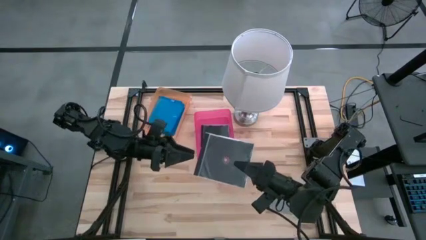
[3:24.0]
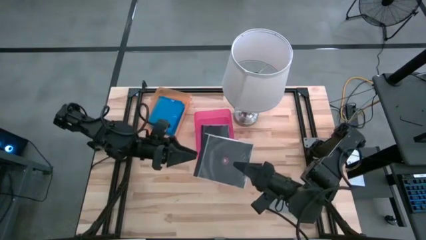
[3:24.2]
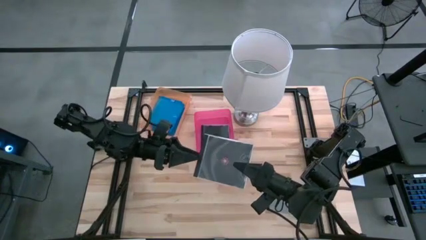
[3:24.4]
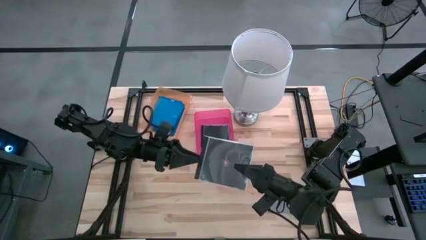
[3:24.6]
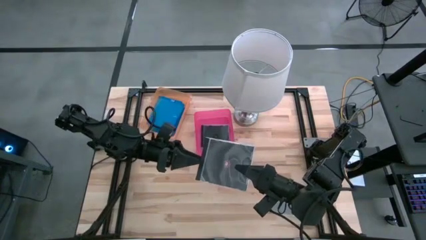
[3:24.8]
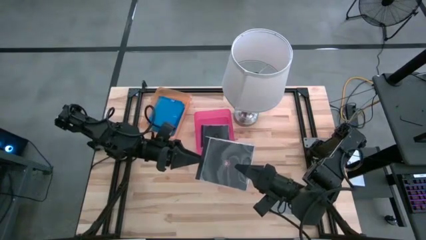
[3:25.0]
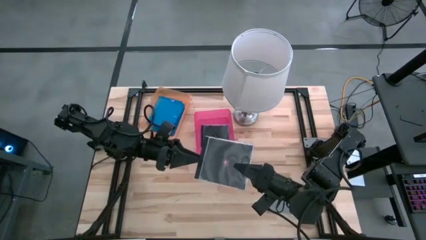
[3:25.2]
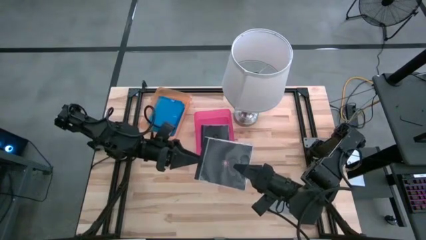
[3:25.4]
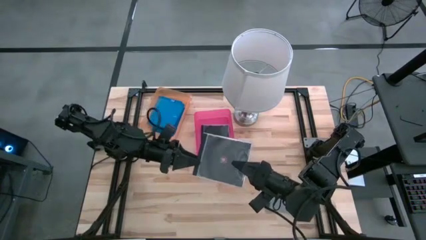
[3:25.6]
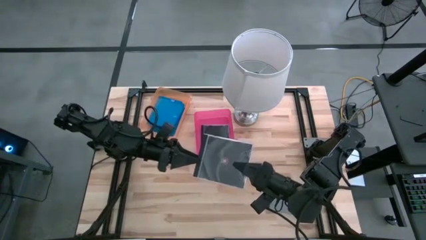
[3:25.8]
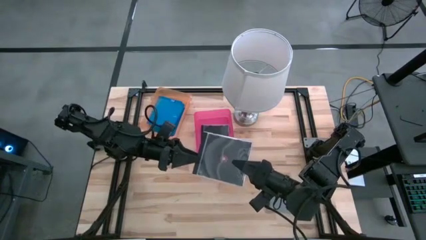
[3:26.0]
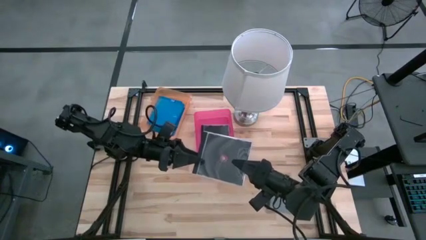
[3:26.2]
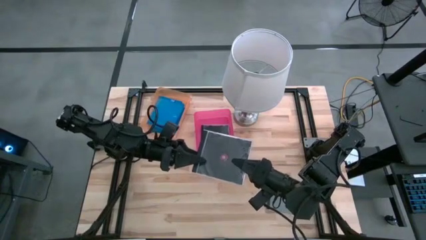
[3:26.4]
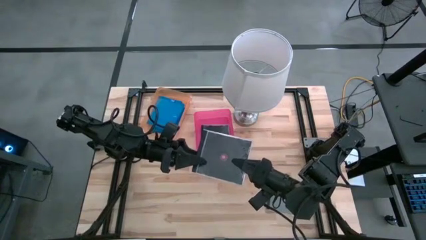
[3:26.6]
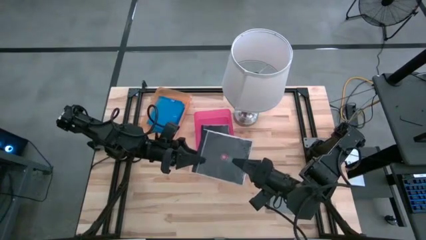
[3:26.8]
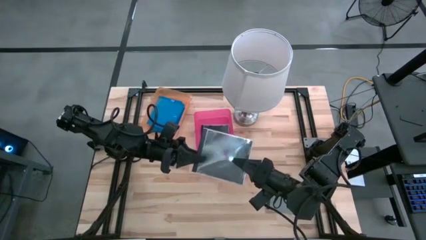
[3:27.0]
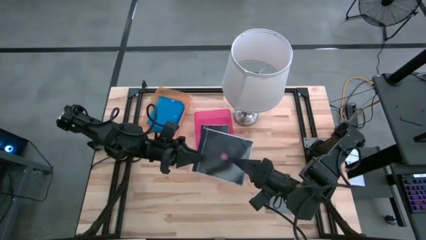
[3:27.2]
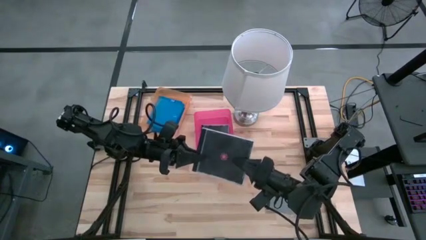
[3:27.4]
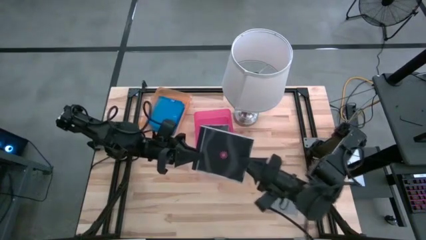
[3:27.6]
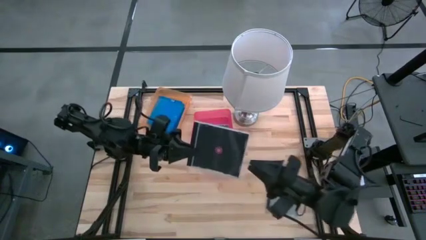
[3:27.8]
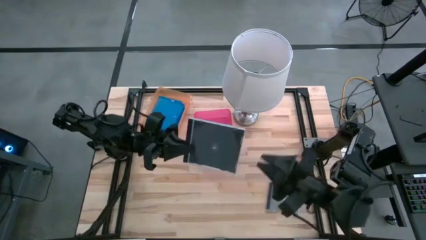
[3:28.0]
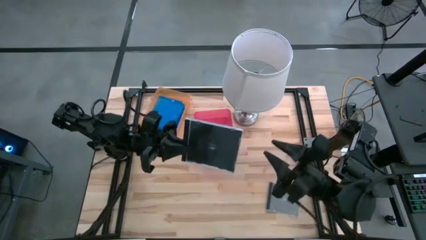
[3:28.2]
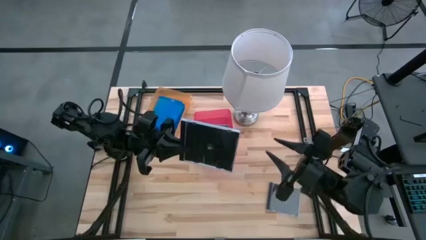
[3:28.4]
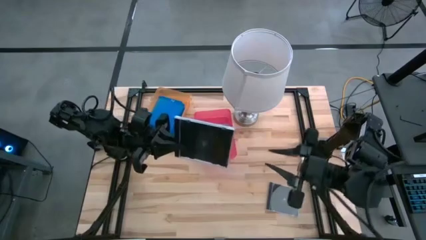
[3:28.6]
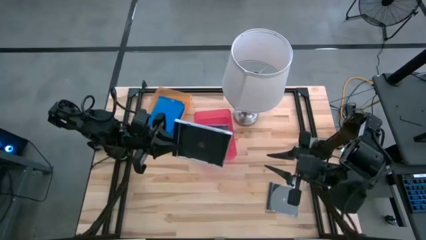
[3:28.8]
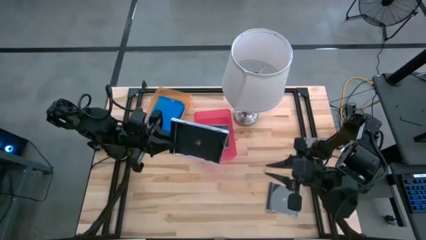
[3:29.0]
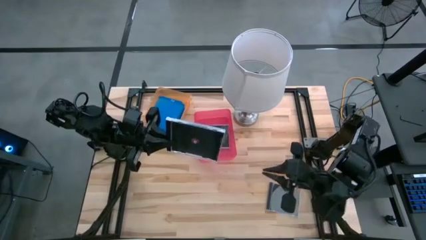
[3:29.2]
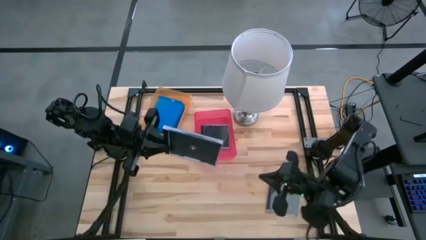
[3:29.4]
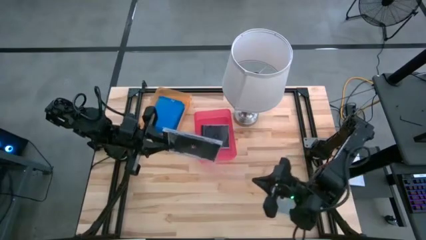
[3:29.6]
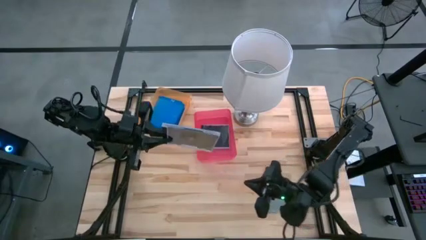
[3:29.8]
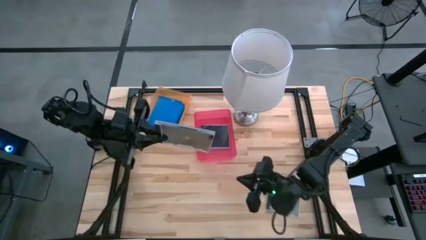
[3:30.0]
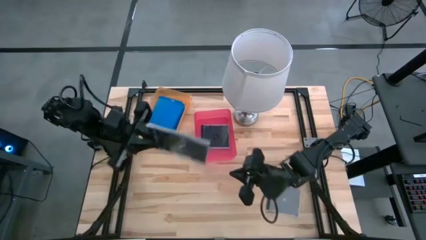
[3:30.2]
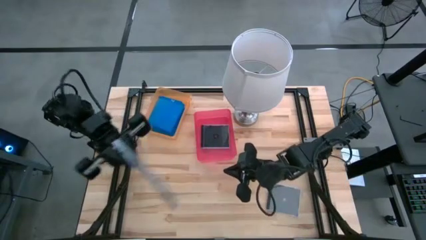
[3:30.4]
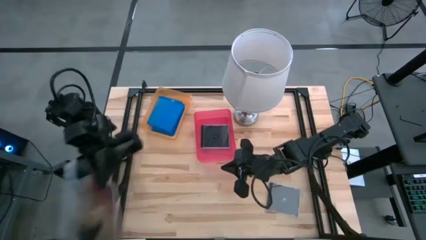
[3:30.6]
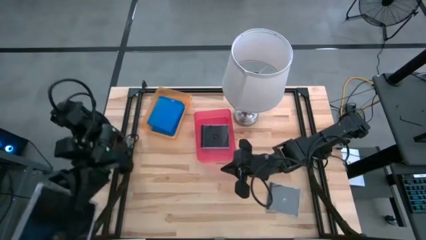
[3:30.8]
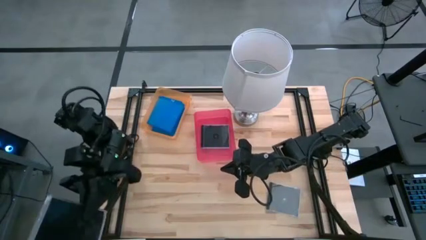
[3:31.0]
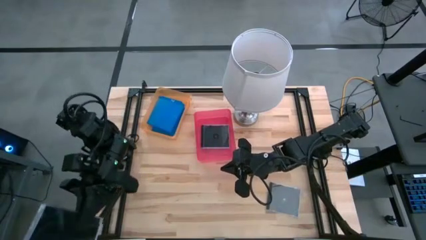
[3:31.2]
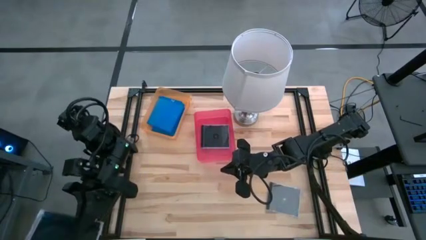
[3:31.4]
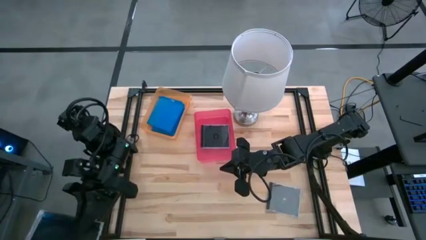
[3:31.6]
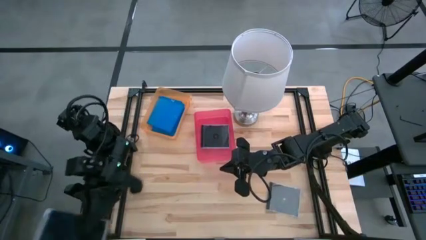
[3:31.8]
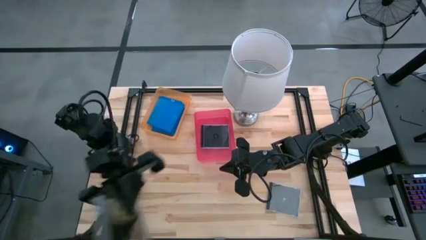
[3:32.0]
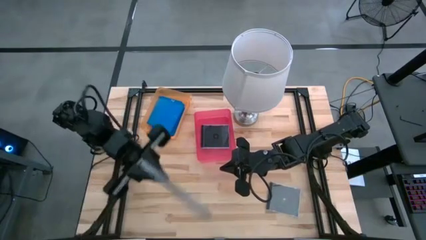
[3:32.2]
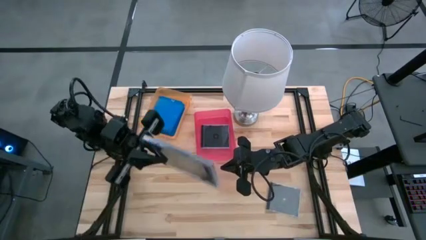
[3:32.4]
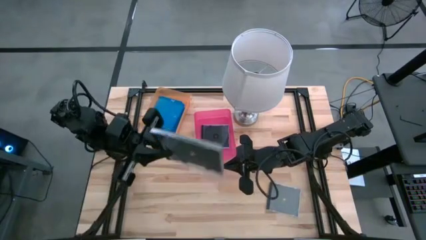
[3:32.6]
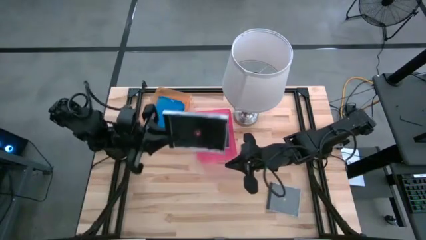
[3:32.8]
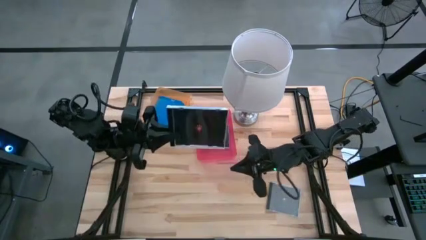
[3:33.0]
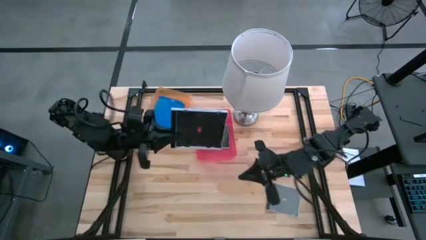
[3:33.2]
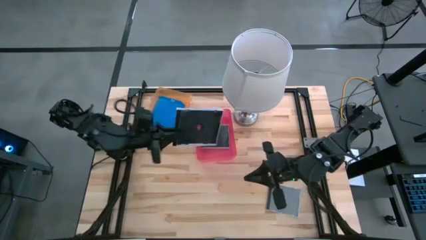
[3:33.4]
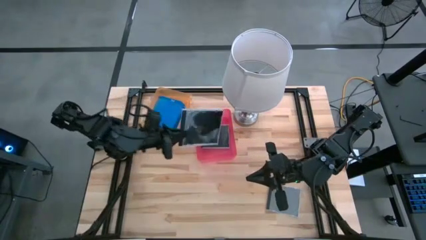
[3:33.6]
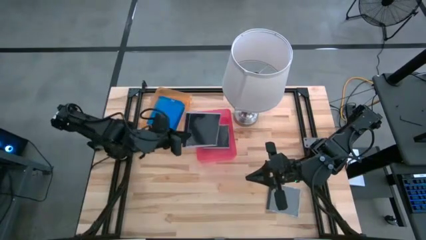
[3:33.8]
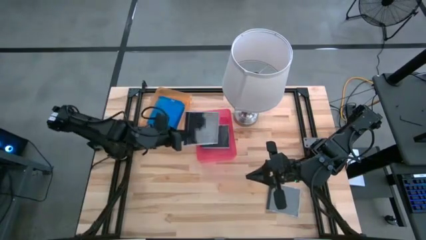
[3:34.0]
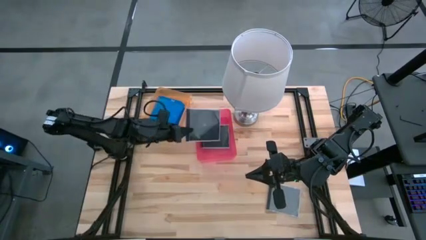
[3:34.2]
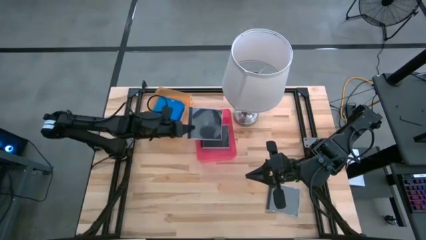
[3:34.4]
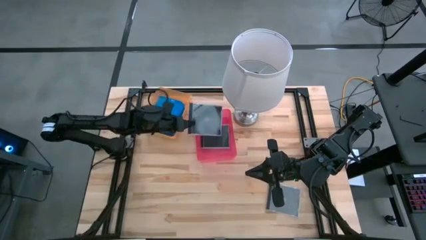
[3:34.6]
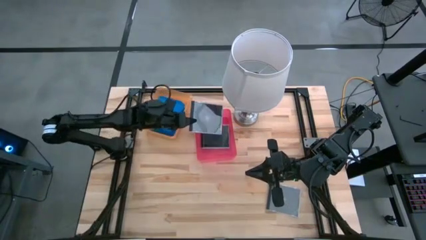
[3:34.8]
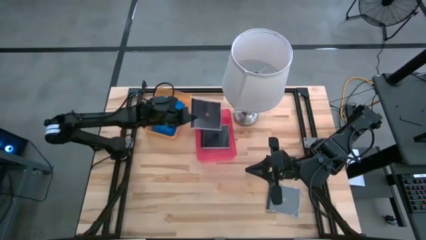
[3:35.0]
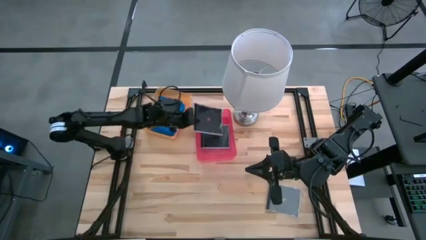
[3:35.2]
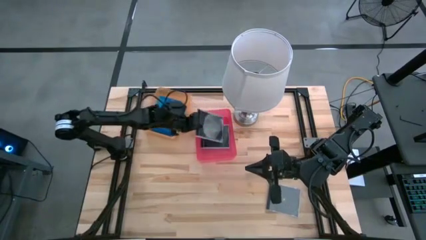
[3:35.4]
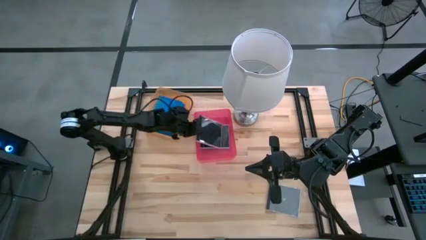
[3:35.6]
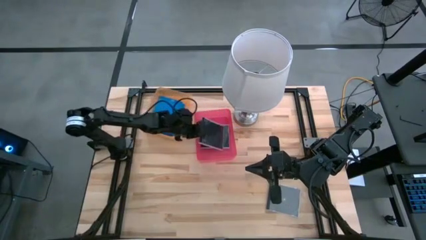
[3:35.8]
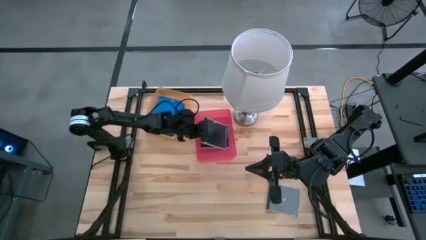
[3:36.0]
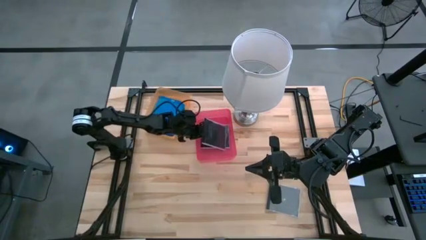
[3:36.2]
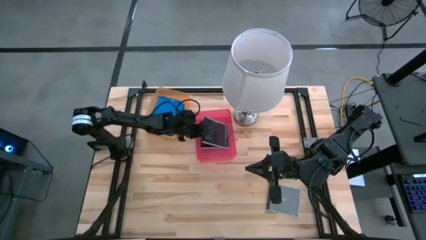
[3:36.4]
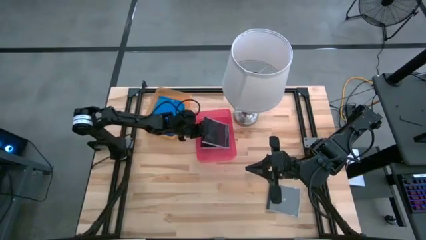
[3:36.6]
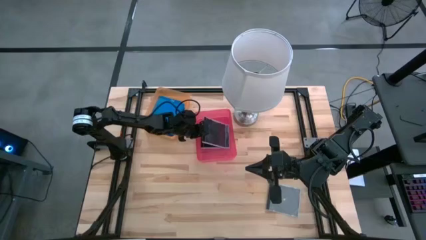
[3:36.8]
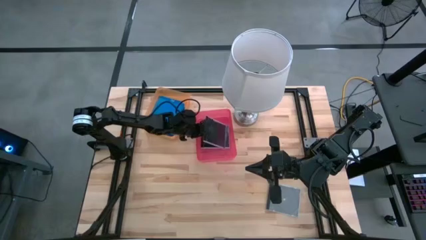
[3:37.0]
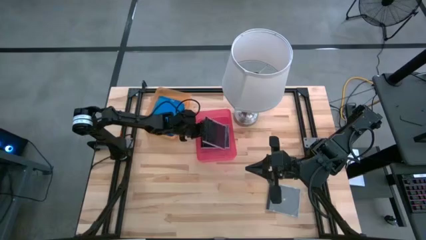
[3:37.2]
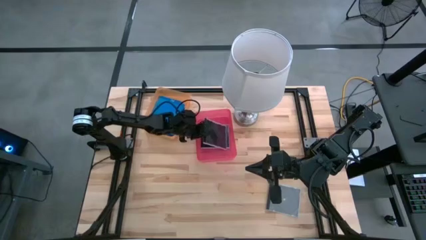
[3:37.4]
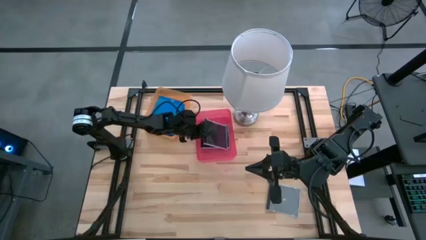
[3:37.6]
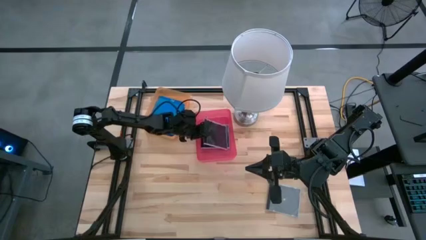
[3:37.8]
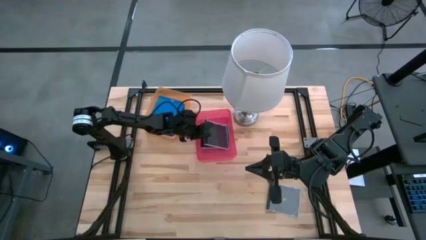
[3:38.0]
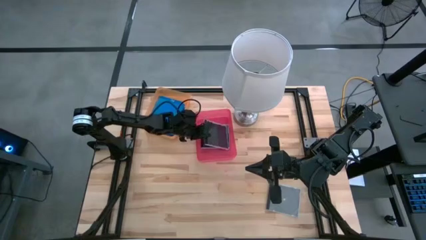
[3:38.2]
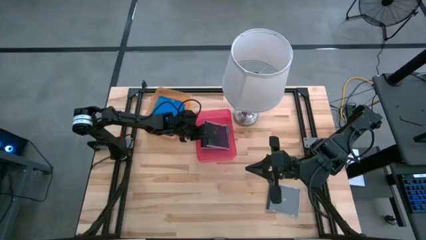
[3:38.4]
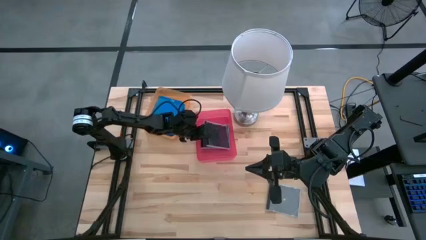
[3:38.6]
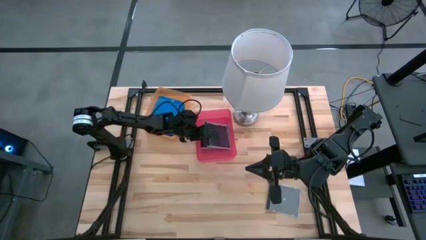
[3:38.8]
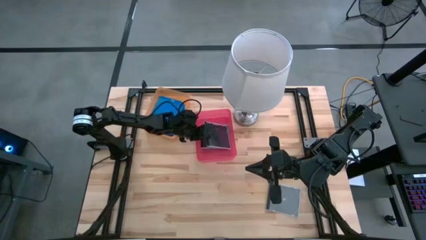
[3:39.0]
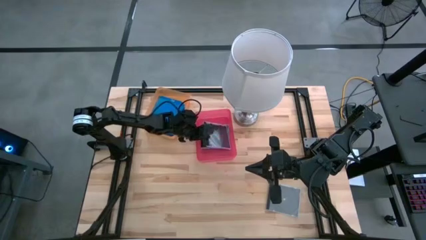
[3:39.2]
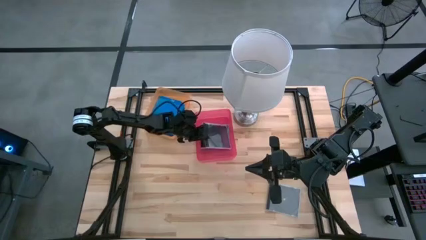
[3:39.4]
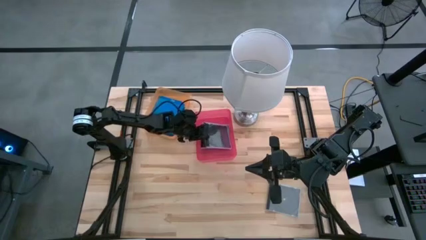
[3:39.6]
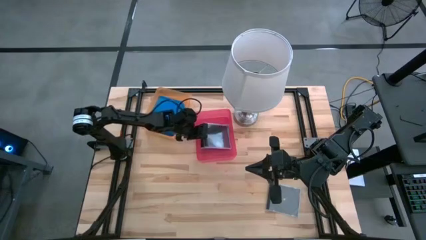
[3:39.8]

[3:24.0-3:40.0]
Task: Pick & place jewel cases by type
Put the left black cd case into the pink bin
